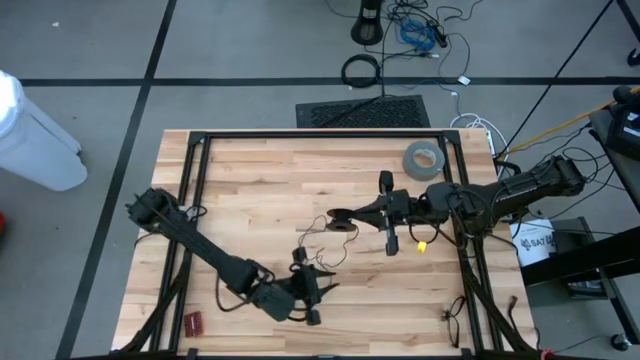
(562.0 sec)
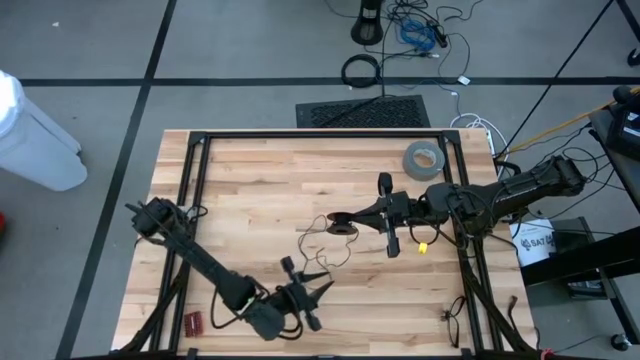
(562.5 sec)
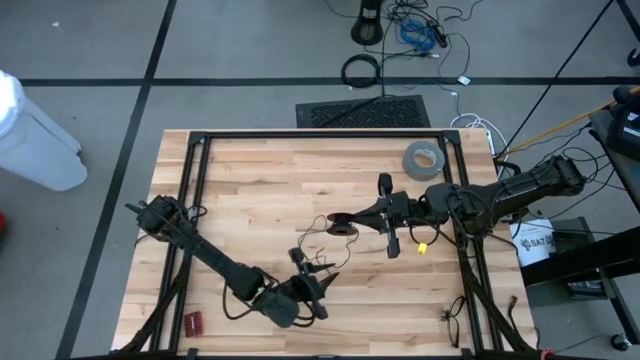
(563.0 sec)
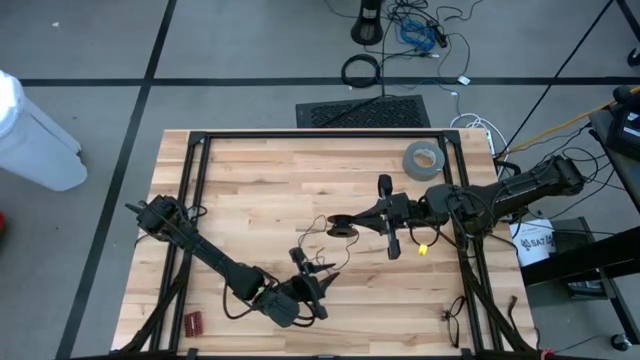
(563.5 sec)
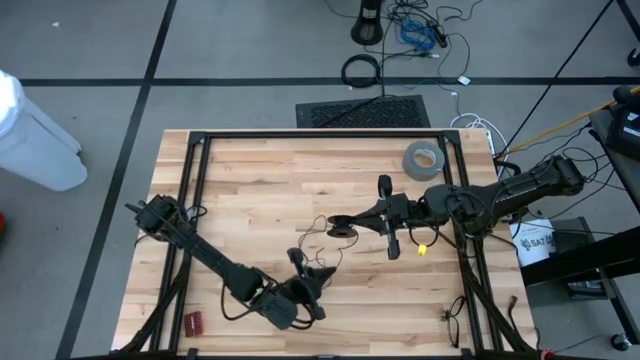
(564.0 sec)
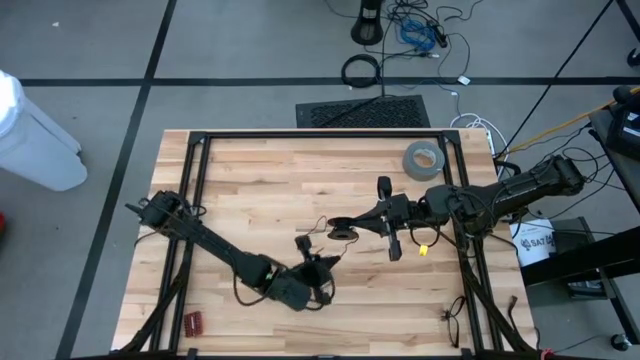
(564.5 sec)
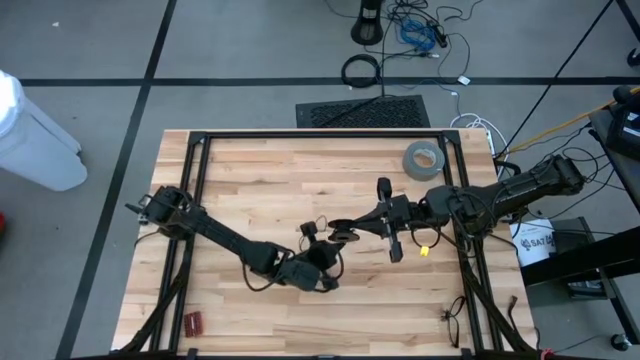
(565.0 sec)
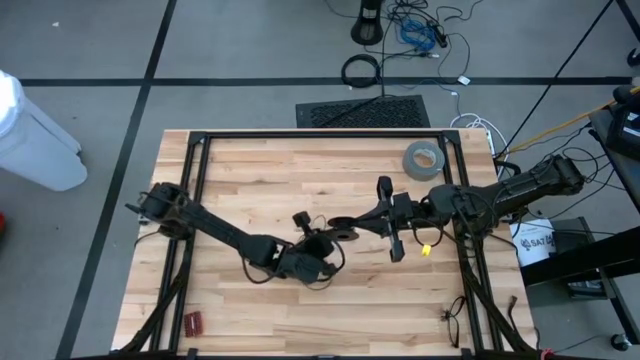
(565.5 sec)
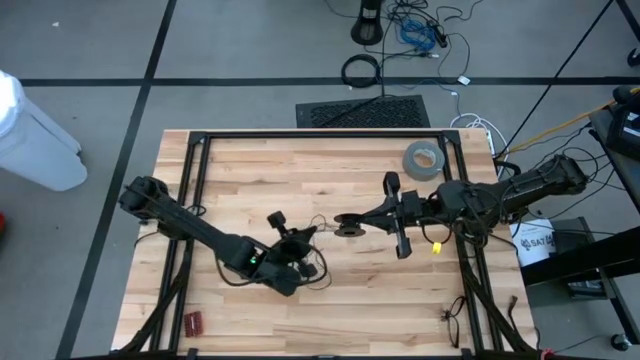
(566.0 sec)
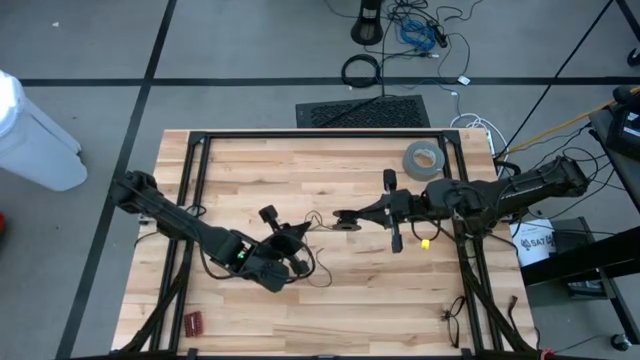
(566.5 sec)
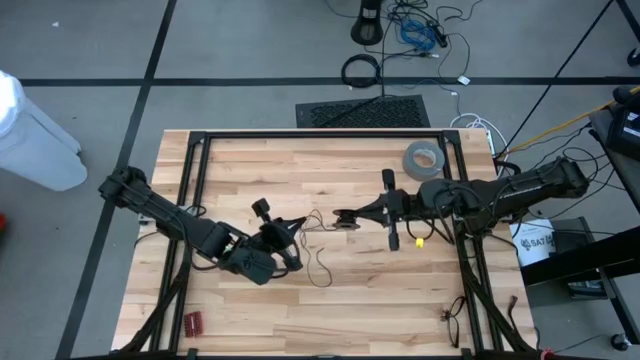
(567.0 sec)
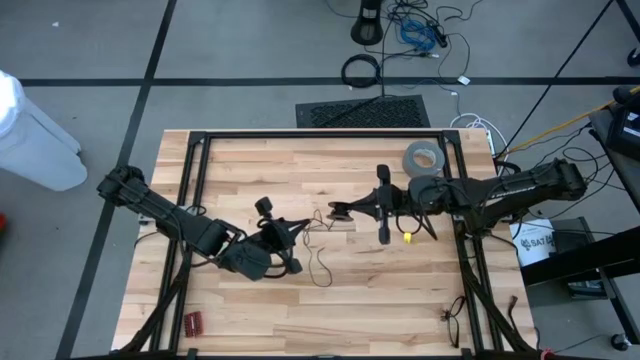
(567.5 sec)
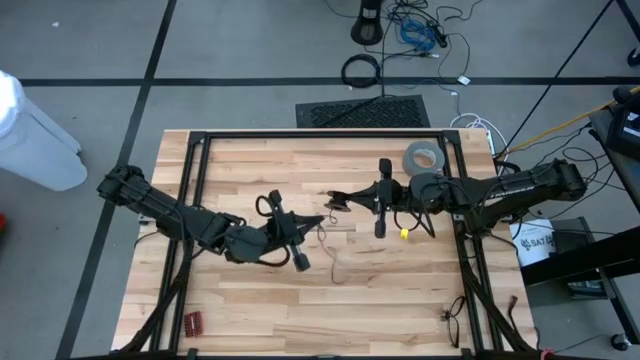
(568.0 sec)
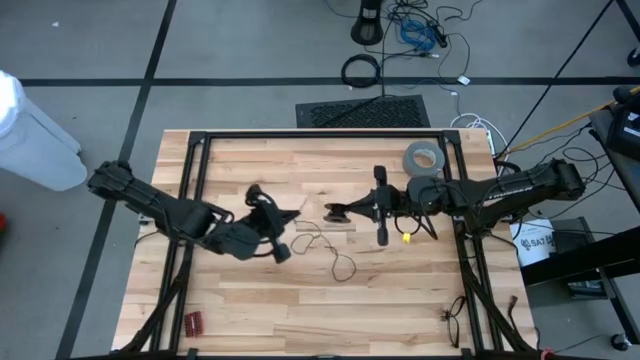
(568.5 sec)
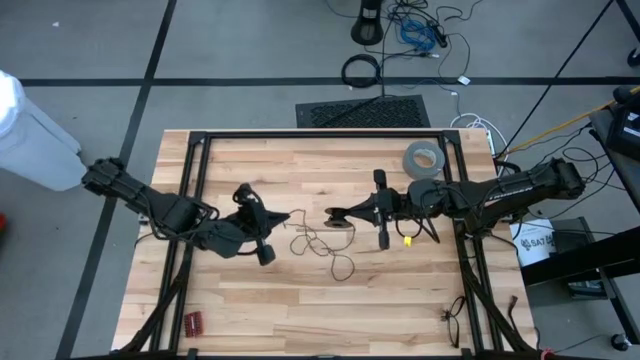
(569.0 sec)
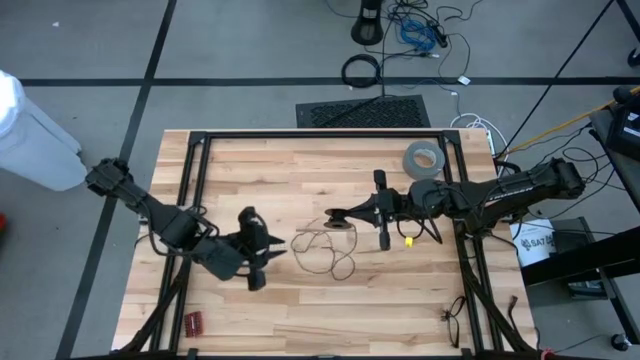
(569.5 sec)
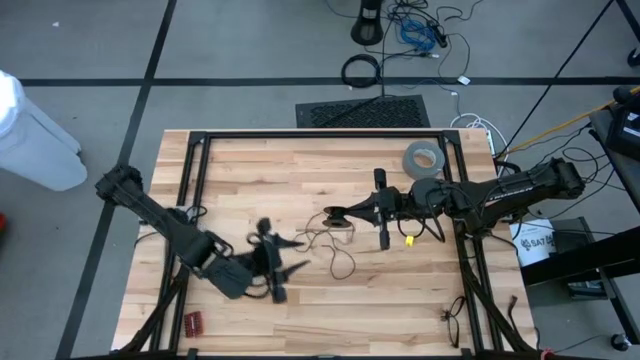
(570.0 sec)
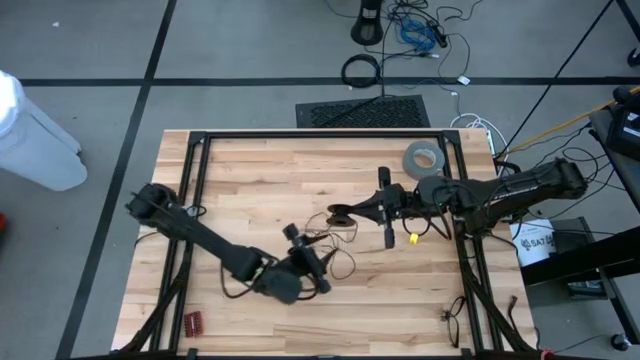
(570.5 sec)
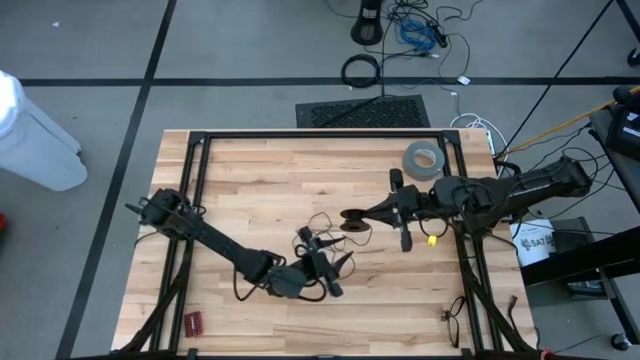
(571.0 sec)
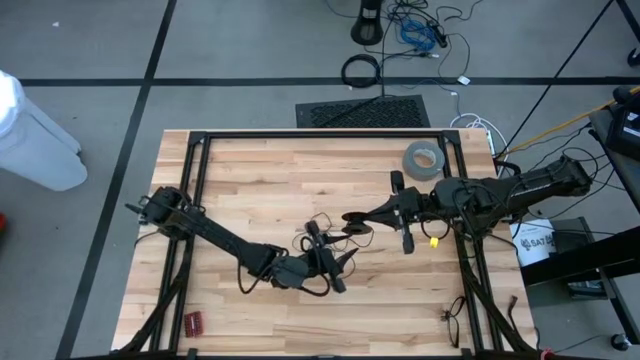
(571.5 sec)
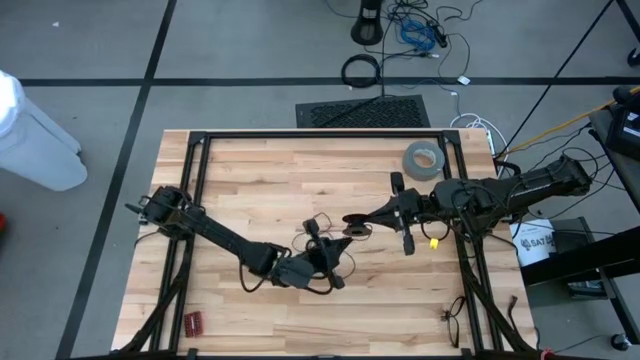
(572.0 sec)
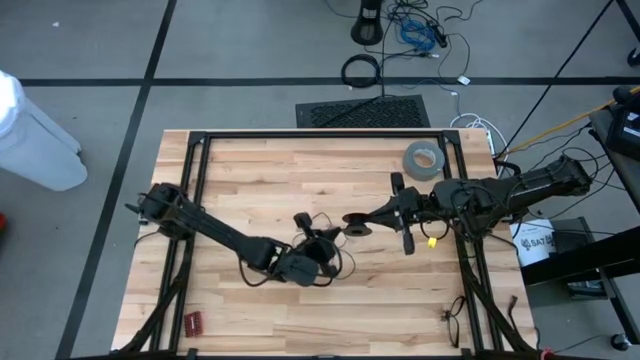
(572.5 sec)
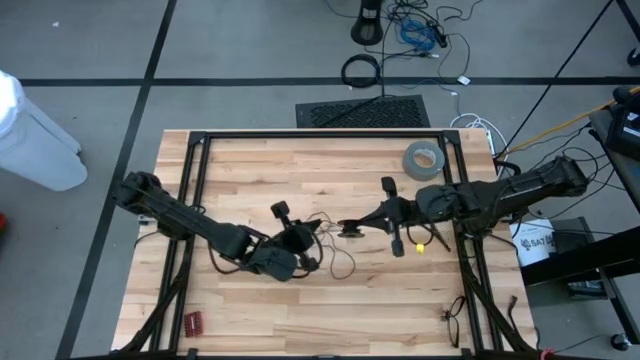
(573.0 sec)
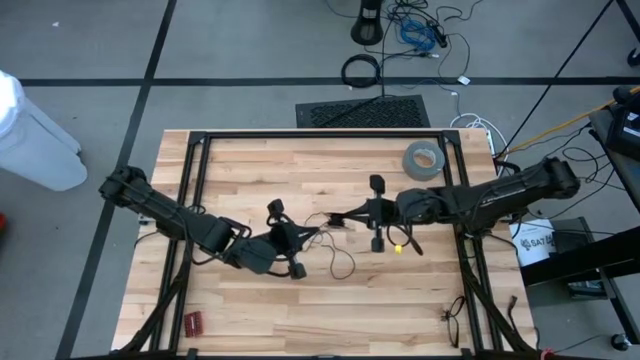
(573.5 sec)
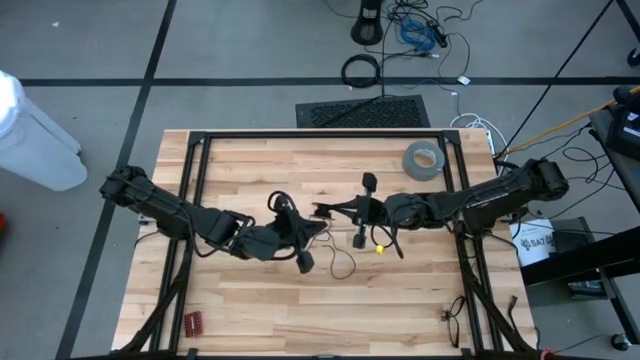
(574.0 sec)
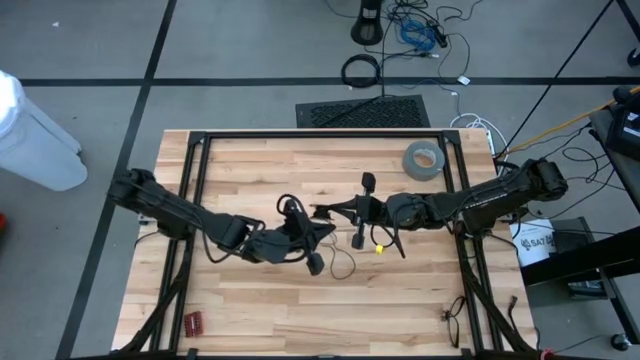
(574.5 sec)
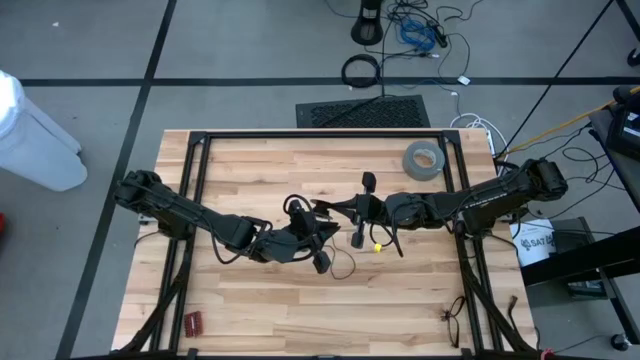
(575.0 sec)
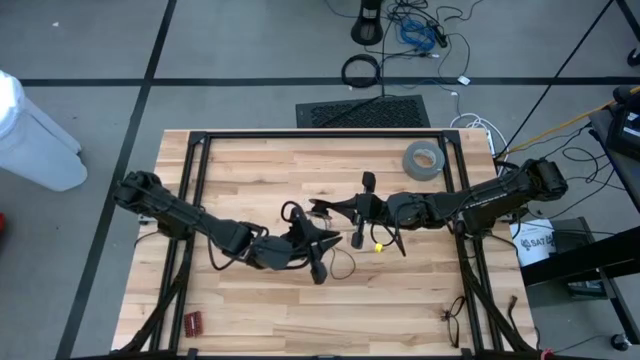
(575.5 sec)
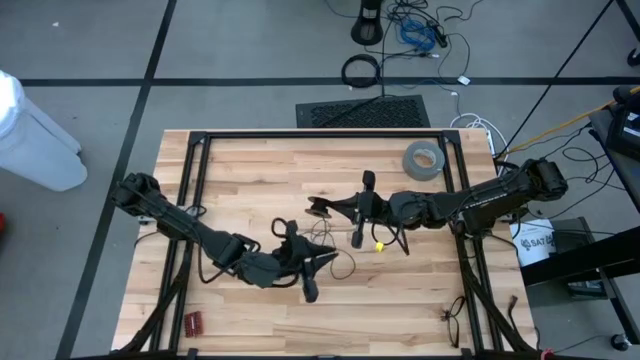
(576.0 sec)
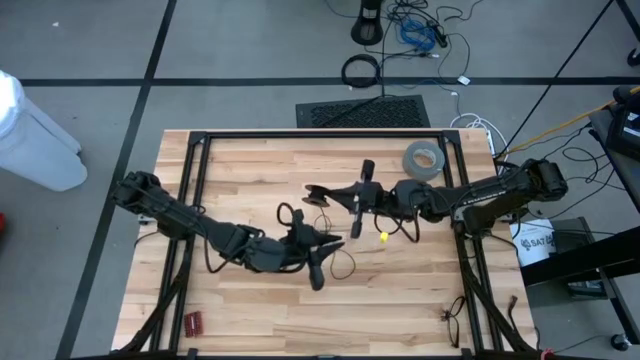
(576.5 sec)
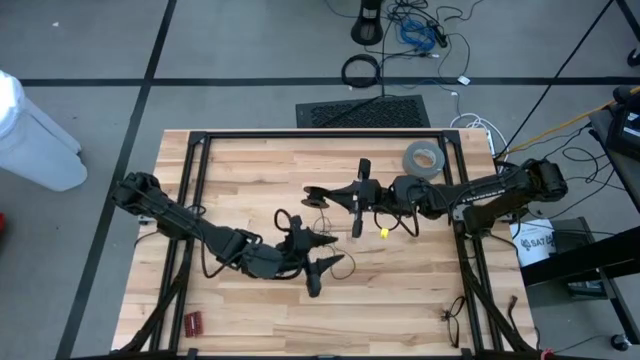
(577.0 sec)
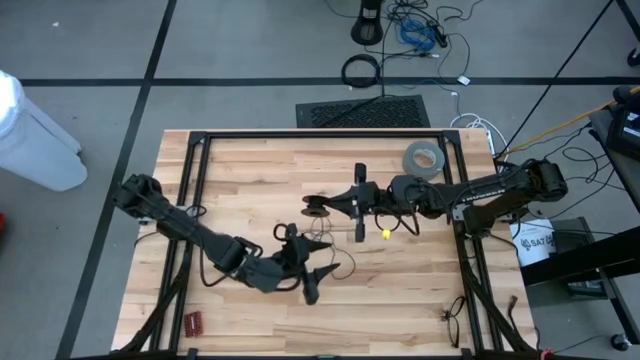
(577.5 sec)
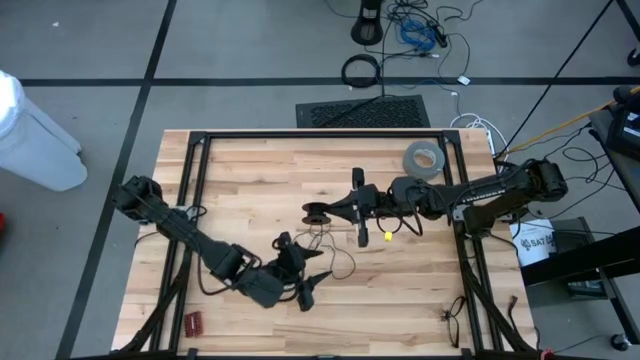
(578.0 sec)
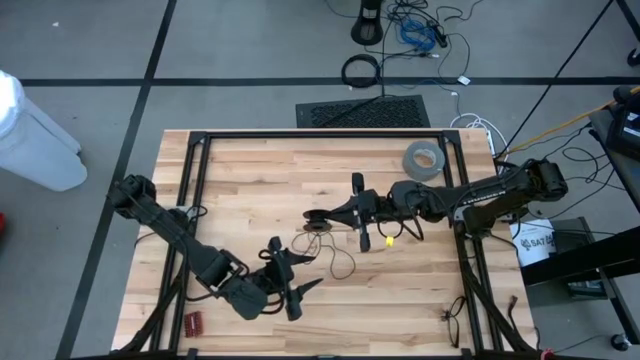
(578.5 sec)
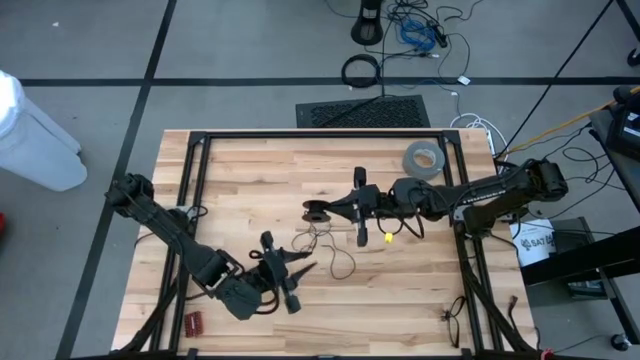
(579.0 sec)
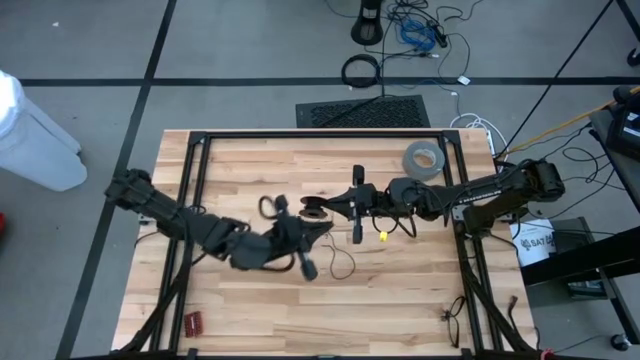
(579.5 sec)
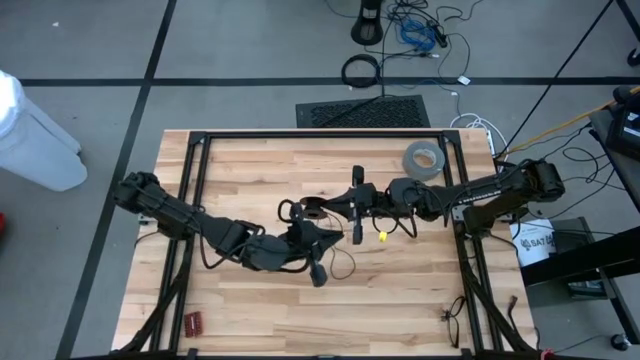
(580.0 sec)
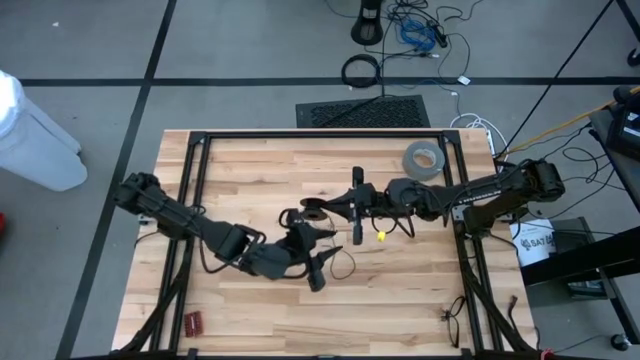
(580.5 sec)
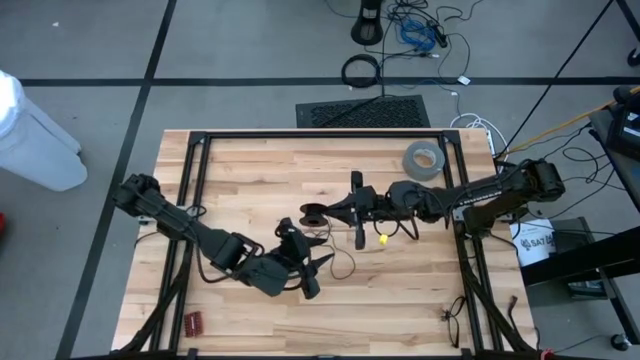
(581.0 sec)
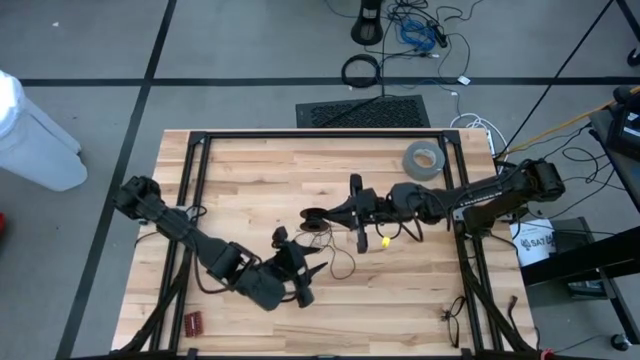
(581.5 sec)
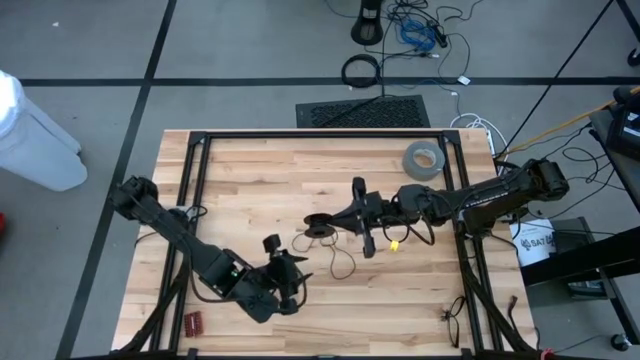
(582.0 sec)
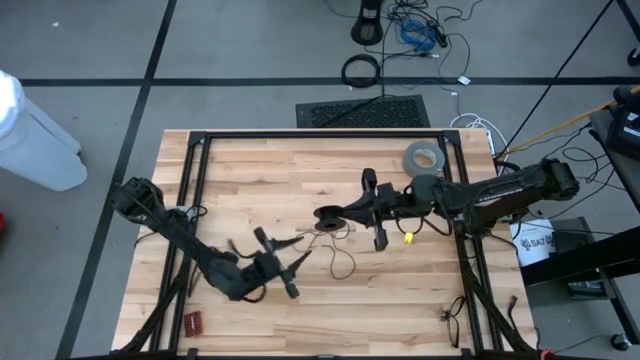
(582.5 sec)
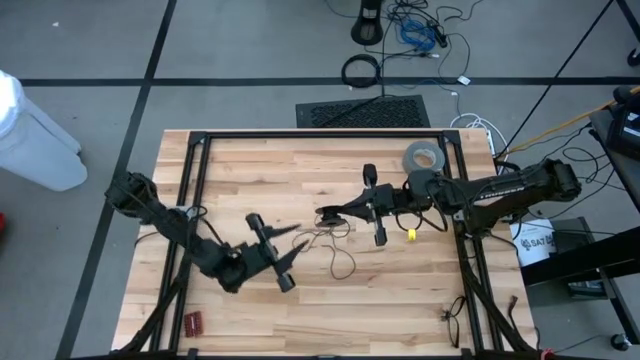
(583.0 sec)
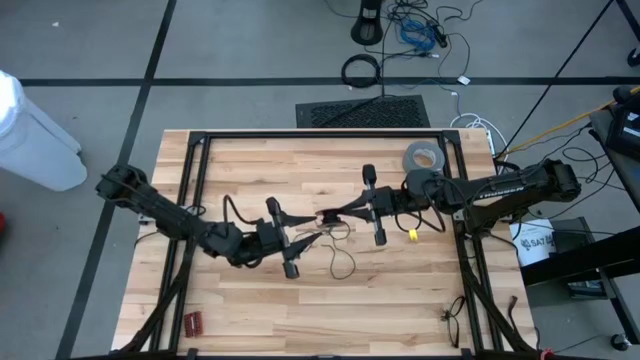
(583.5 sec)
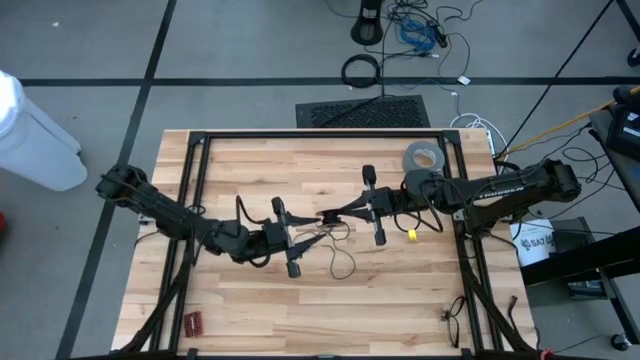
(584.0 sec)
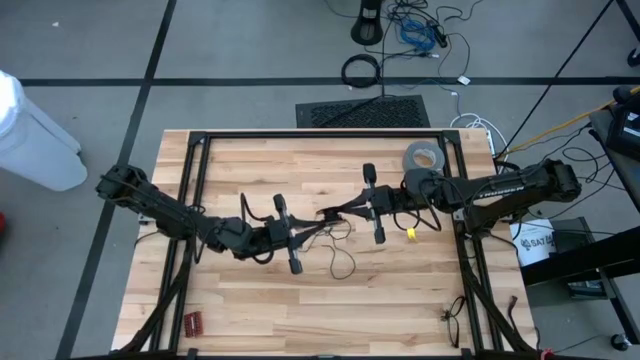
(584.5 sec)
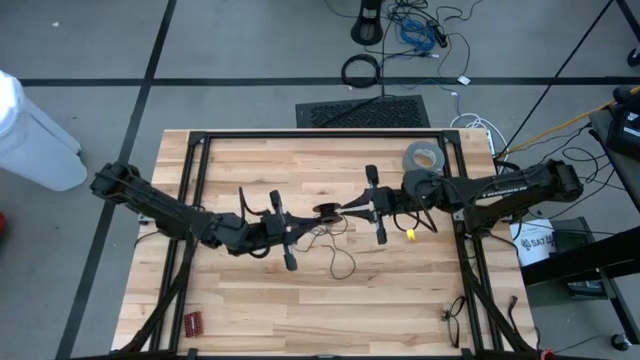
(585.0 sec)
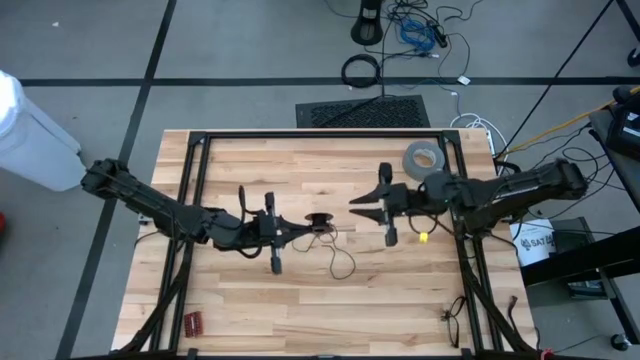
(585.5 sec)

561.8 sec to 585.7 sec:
Task: Coil cords
Coil the black wire onto the spool
